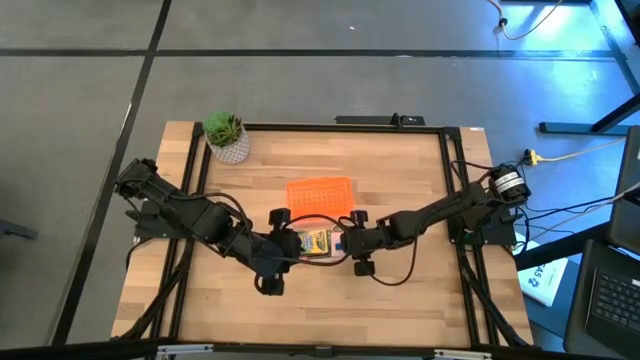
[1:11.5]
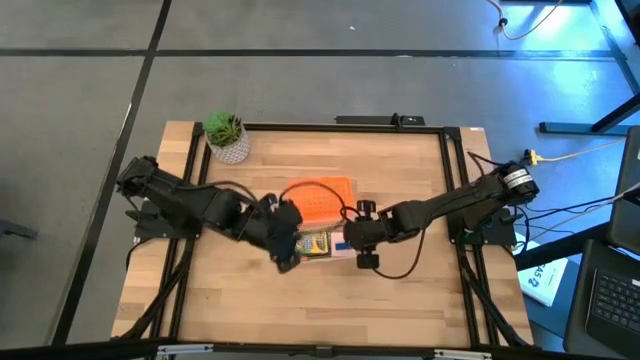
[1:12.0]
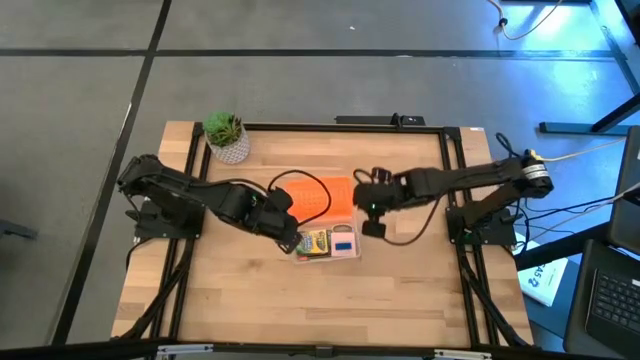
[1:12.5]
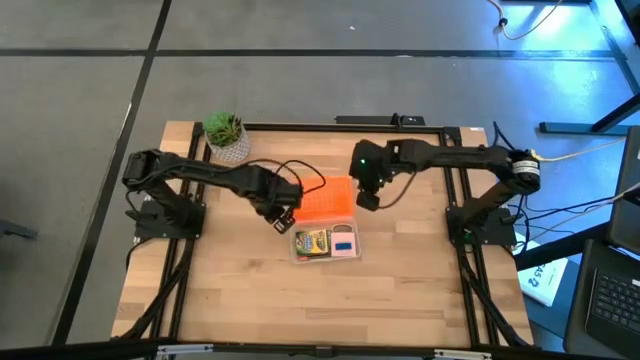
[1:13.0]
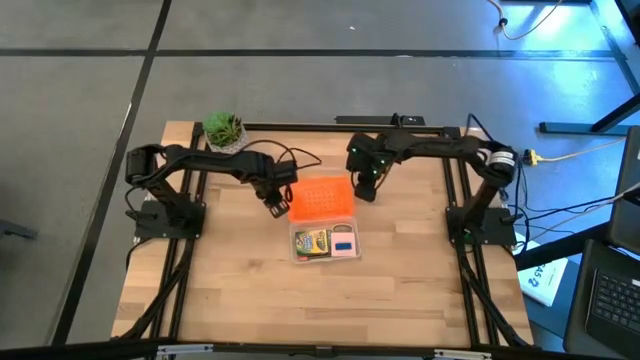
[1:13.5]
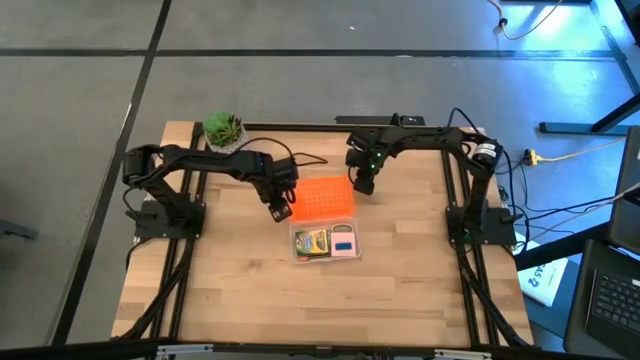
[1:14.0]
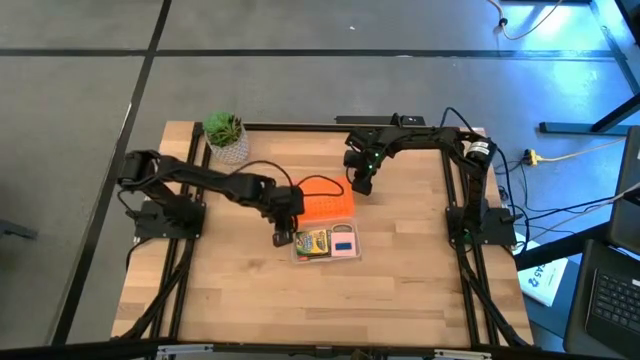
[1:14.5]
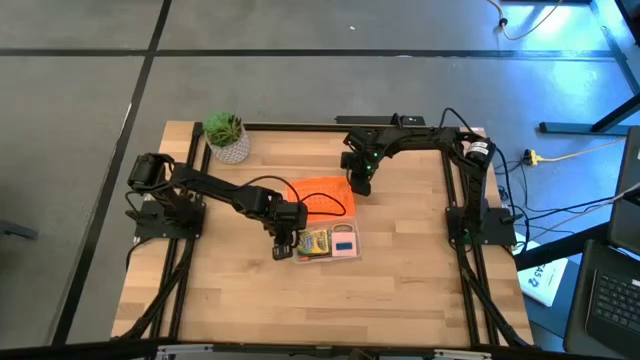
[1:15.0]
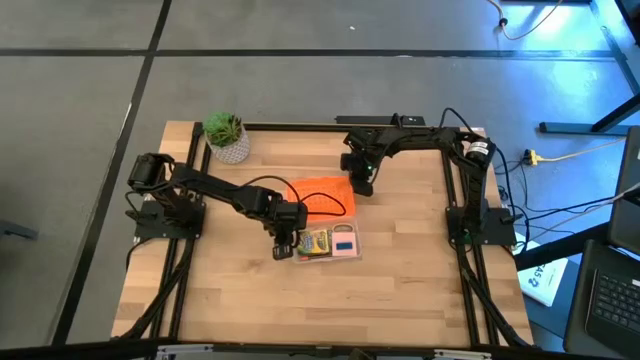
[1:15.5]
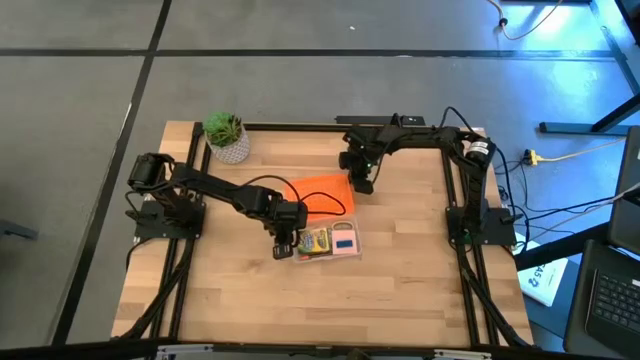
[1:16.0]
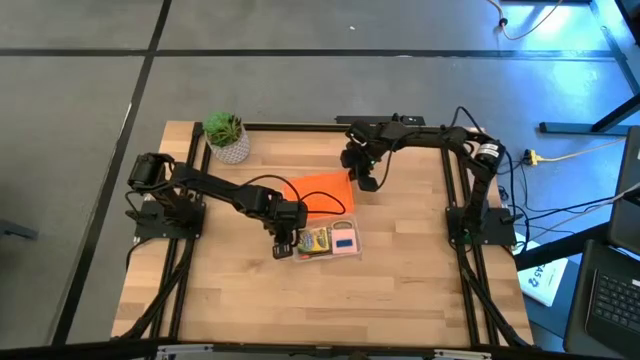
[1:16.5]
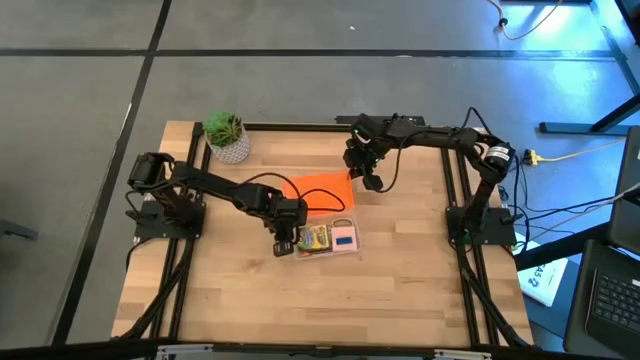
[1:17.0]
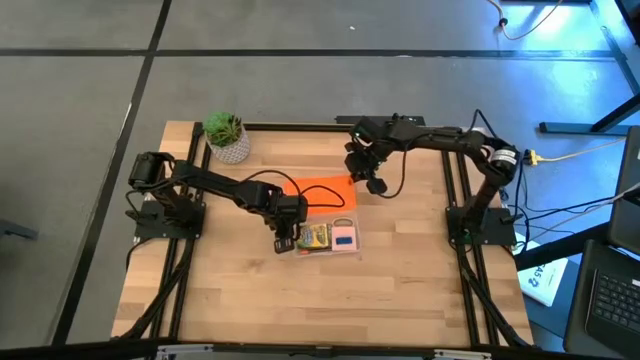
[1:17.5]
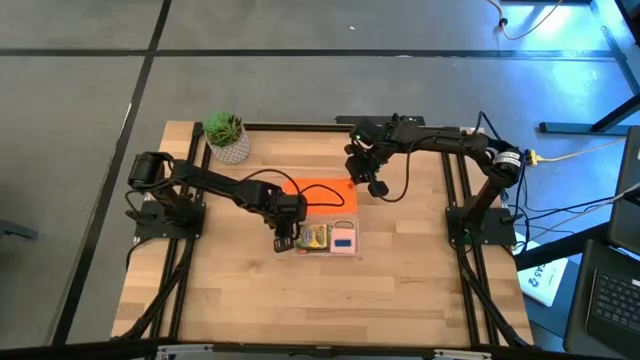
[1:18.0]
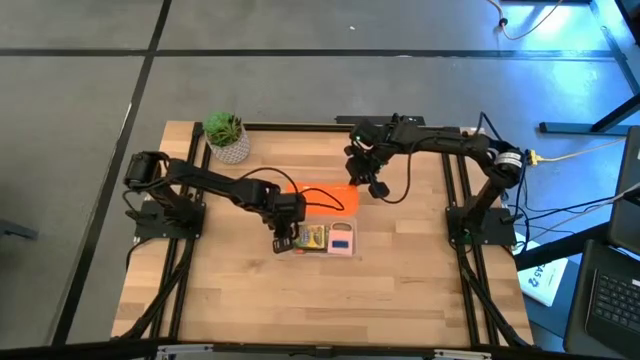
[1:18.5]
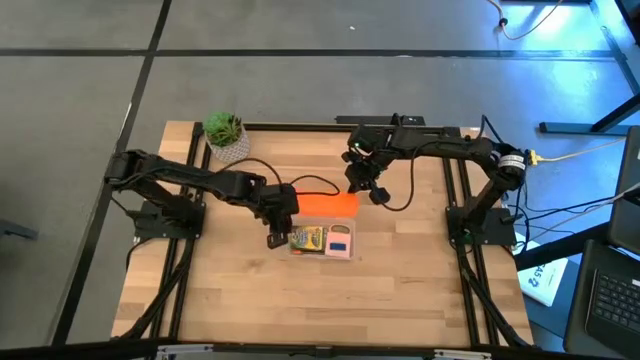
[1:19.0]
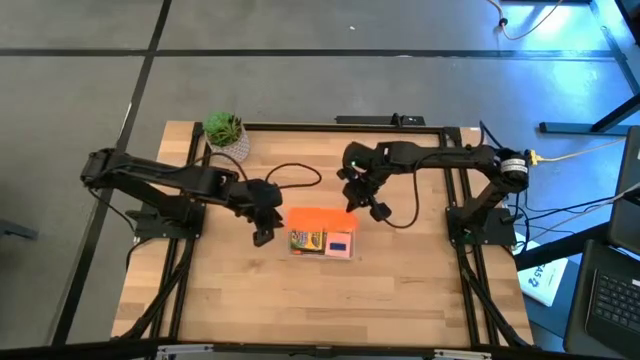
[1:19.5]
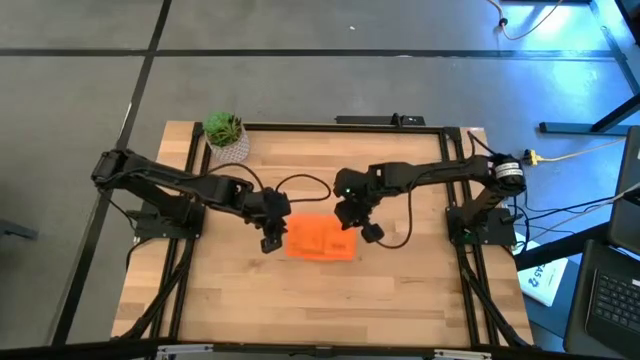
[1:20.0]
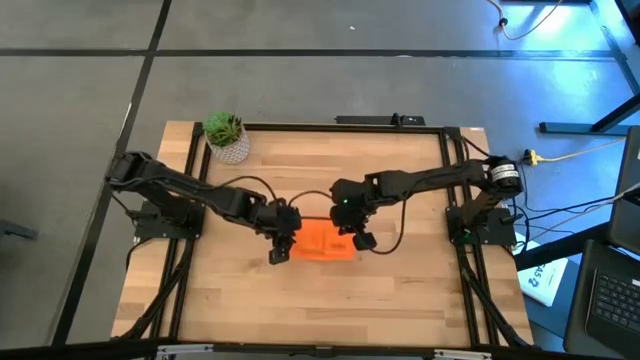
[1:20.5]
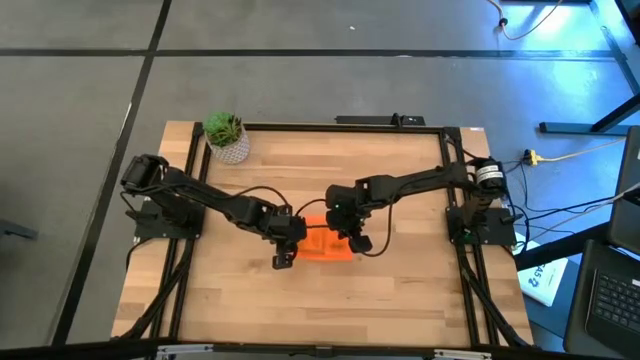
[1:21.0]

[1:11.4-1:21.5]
Task: Pack school essentials
Close the supply box

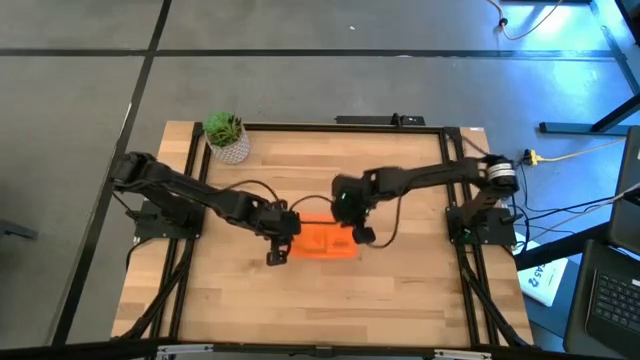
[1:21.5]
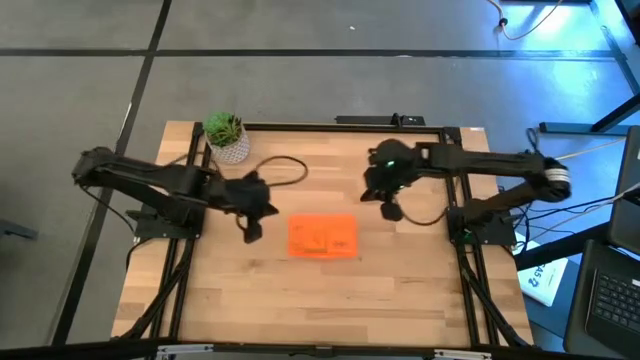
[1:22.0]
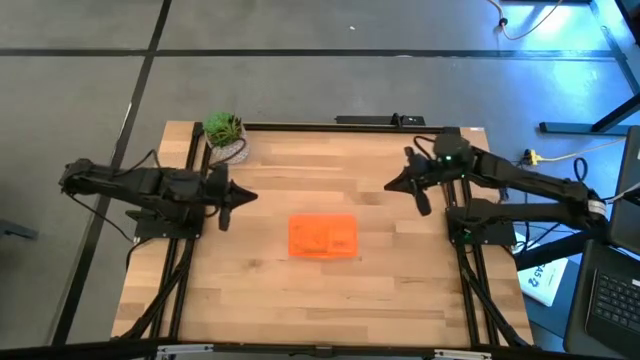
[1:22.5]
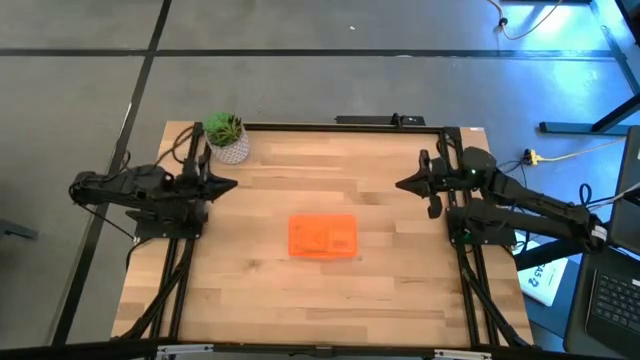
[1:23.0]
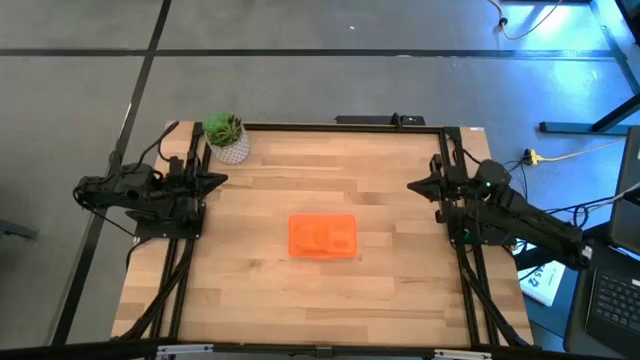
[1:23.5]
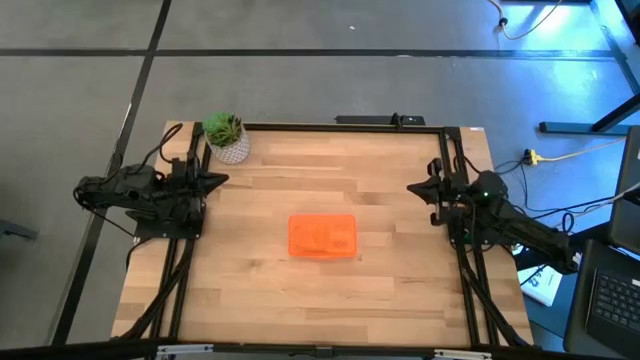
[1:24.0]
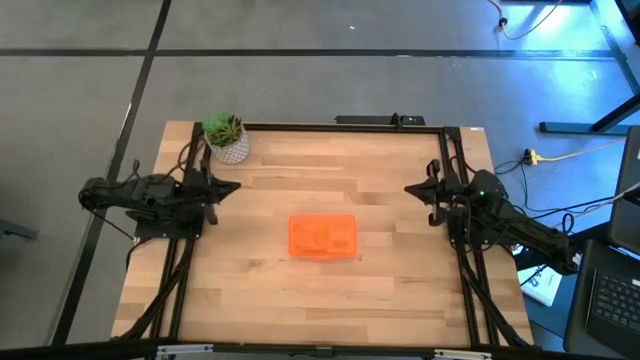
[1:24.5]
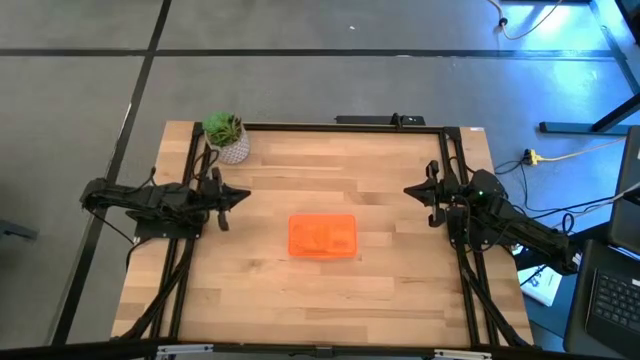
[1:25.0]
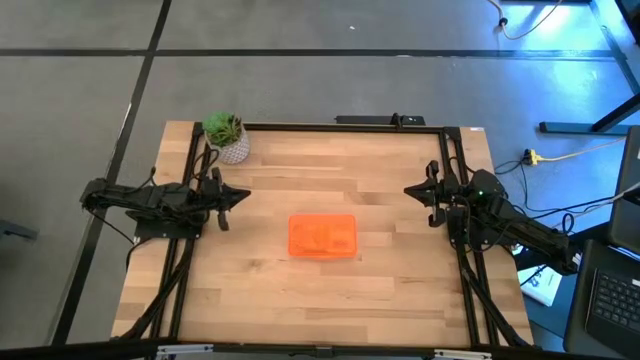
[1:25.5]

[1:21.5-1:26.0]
Return to Home Position

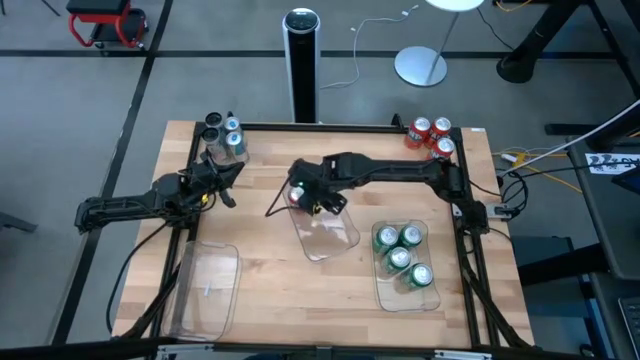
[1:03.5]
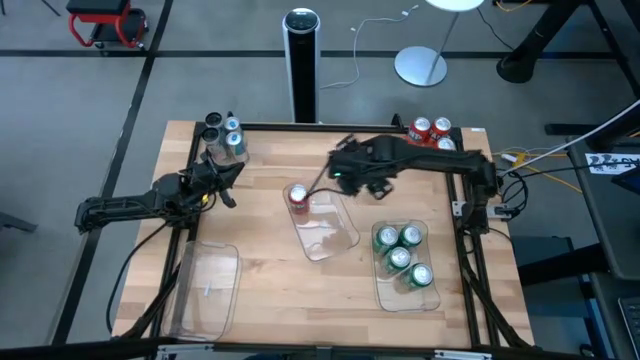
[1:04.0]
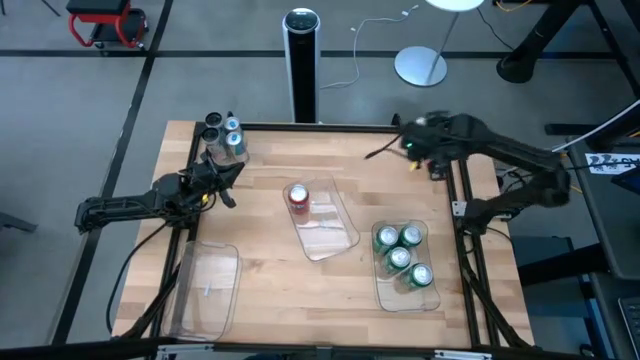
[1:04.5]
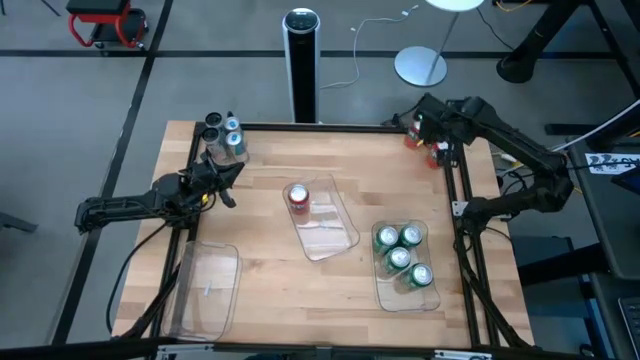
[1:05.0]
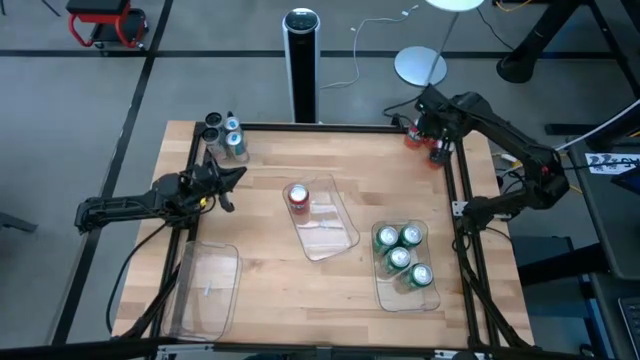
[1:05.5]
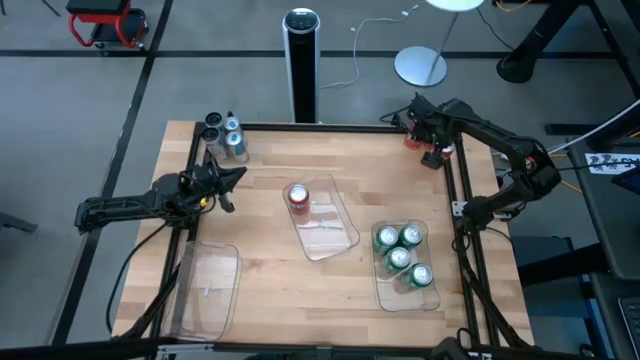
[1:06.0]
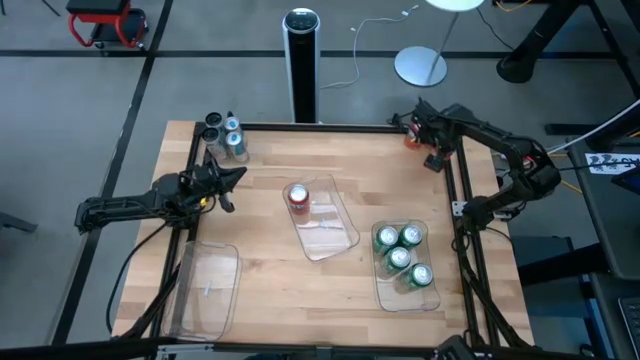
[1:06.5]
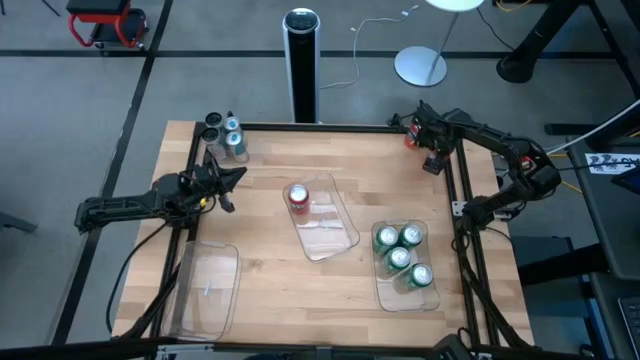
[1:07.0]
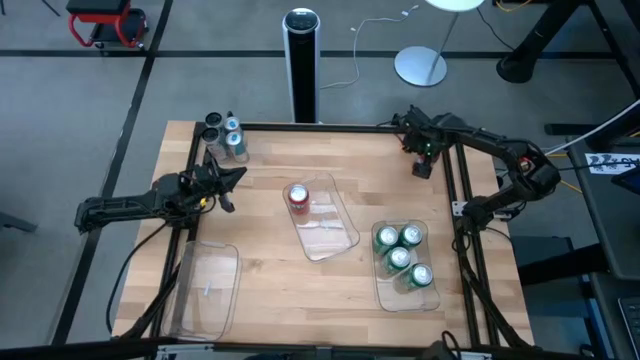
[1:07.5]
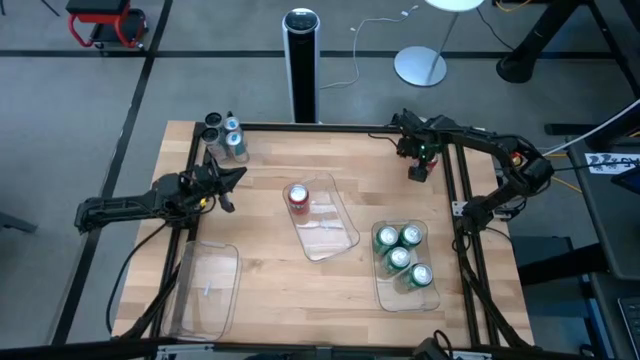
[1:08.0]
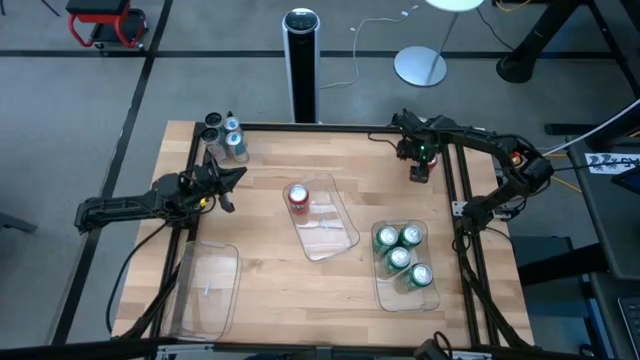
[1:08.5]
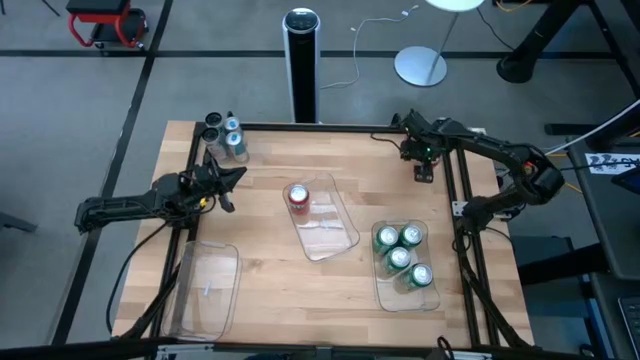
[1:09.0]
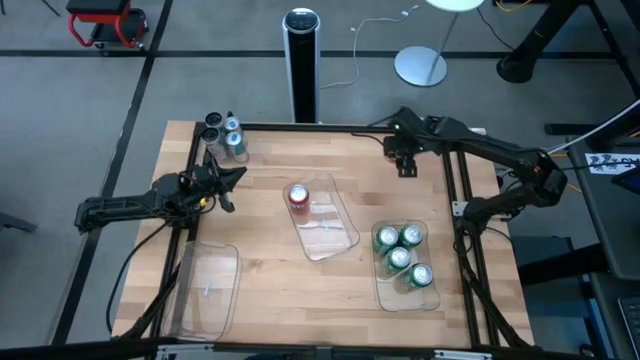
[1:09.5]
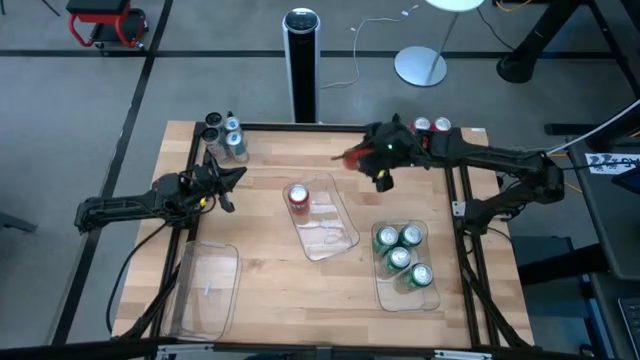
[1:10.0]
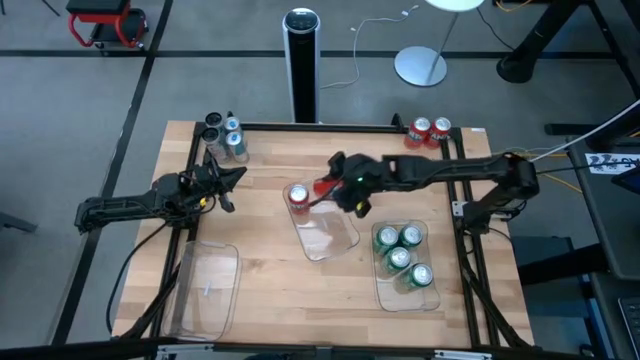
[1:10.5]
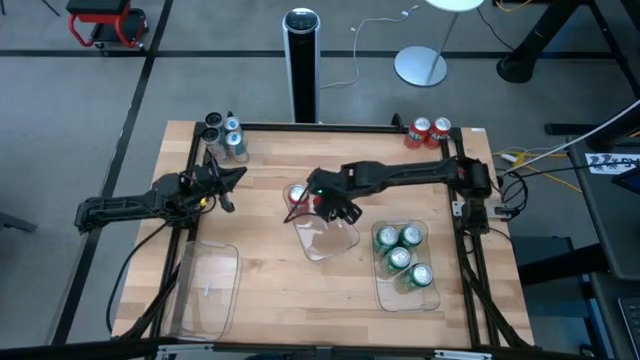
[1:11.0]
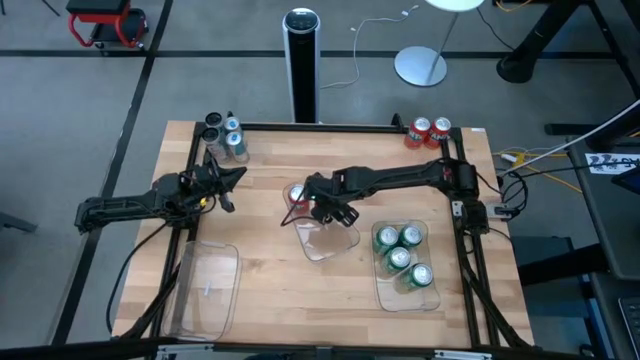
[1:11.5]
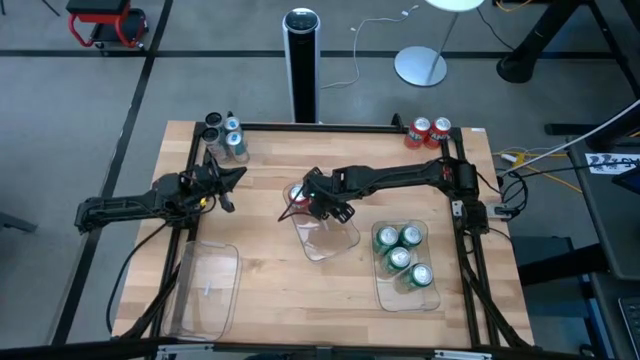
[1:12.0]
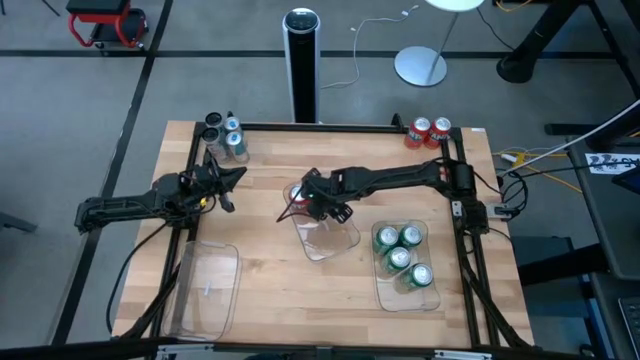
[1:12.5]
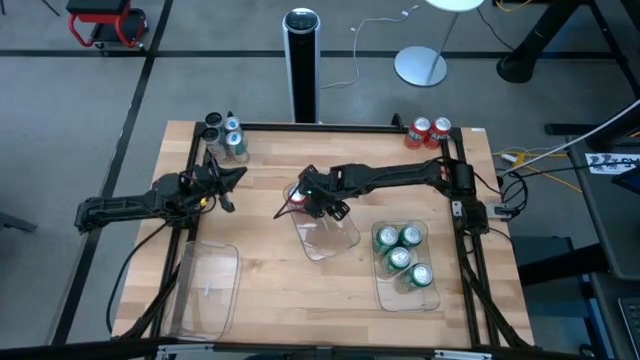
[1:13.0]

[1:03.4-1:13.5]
Task: Sort soda cans
Put the bottom orange soda can into the middle transparent bin
